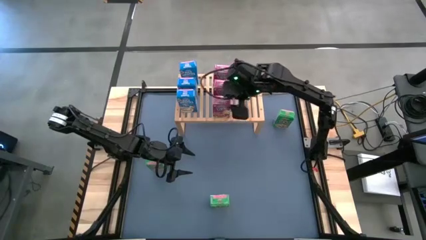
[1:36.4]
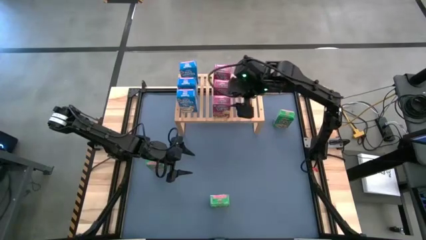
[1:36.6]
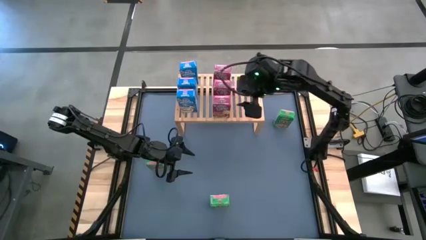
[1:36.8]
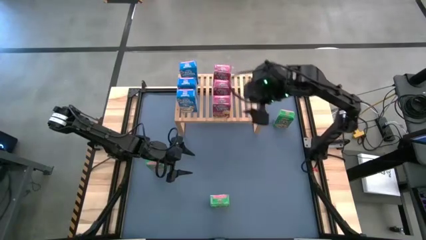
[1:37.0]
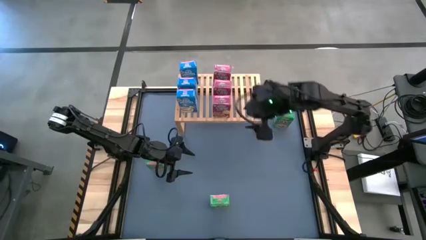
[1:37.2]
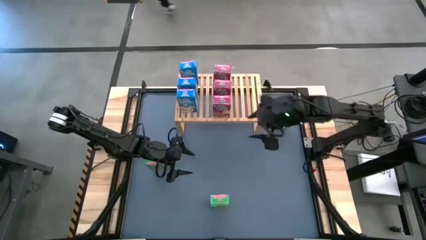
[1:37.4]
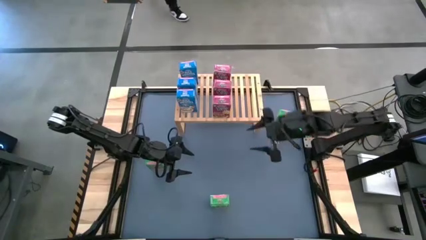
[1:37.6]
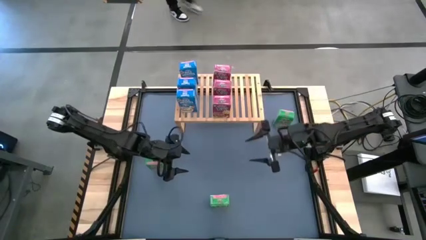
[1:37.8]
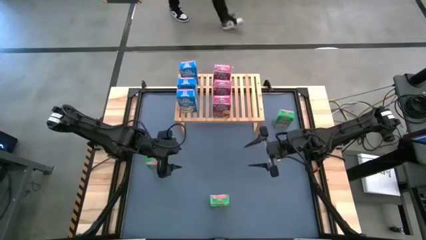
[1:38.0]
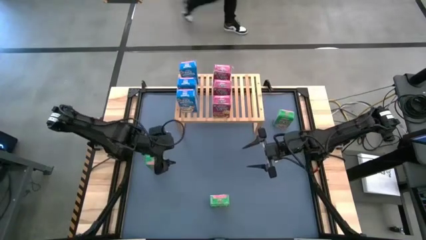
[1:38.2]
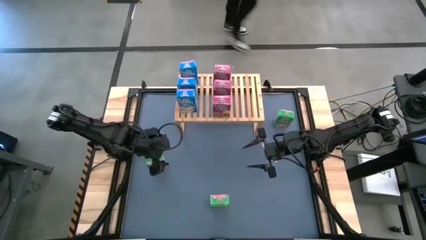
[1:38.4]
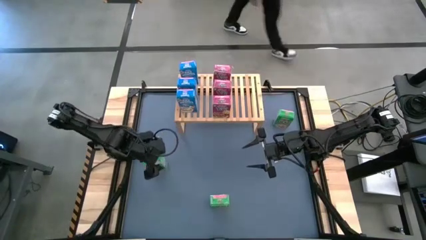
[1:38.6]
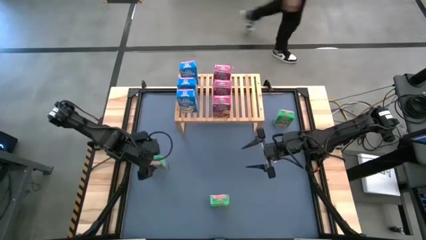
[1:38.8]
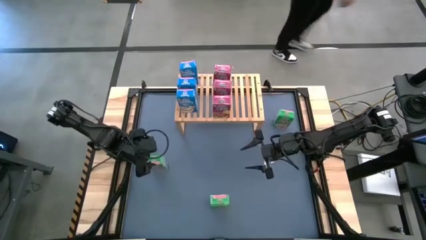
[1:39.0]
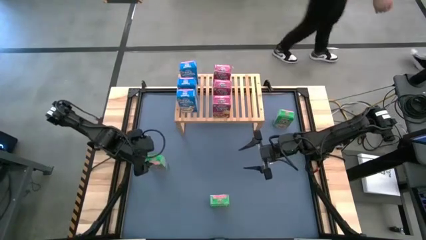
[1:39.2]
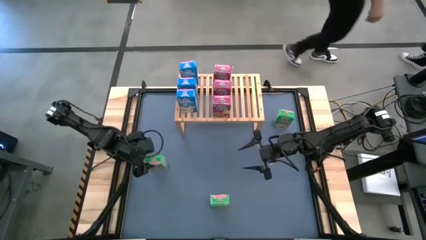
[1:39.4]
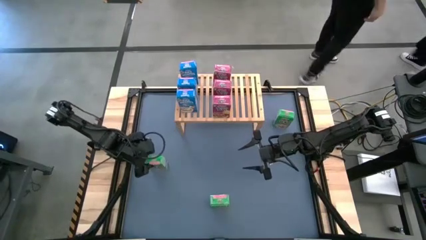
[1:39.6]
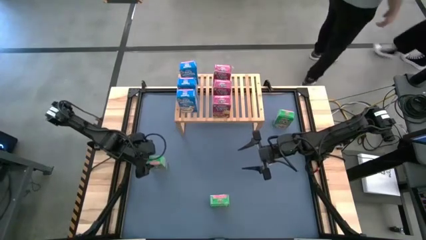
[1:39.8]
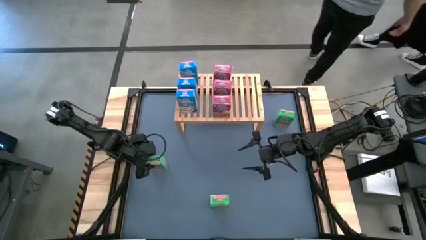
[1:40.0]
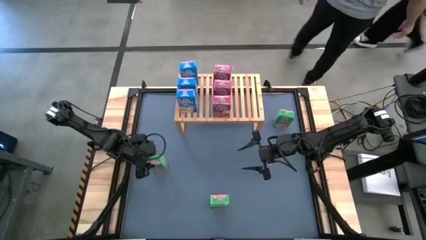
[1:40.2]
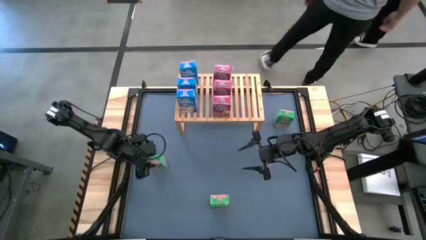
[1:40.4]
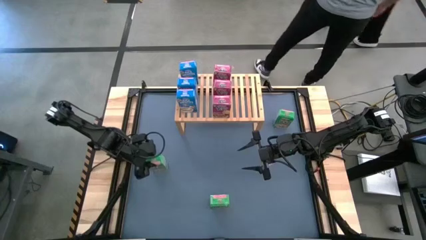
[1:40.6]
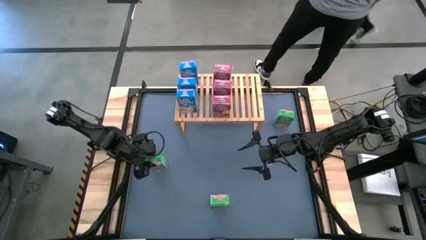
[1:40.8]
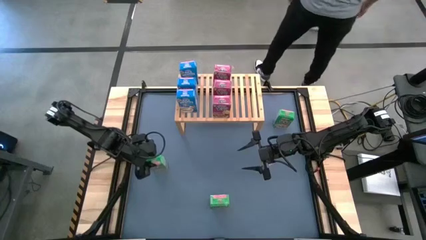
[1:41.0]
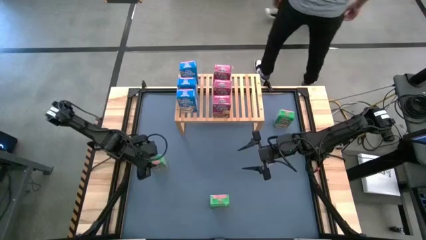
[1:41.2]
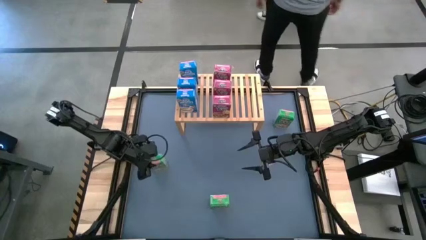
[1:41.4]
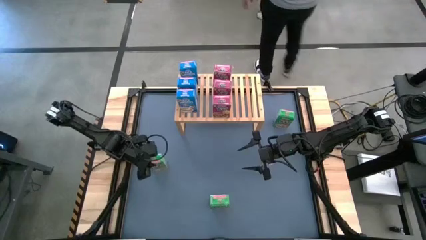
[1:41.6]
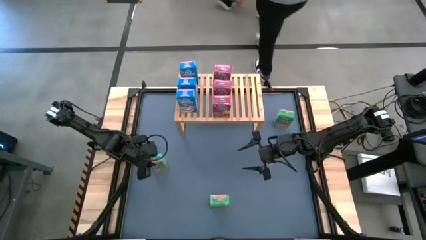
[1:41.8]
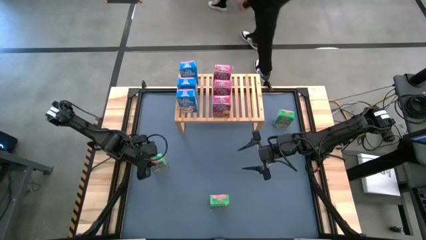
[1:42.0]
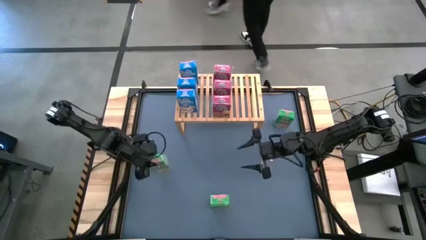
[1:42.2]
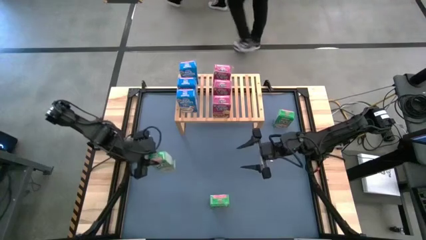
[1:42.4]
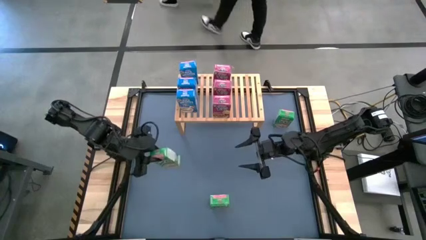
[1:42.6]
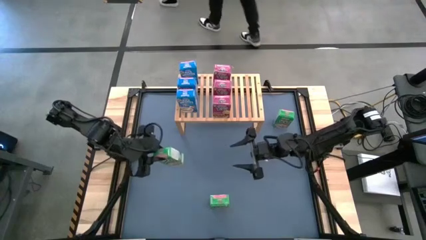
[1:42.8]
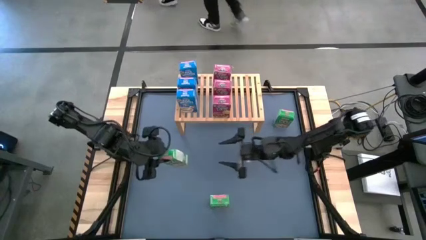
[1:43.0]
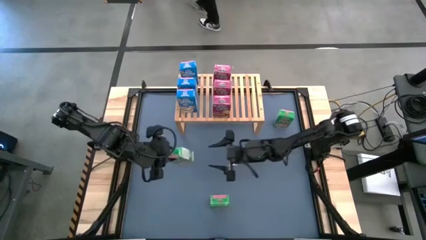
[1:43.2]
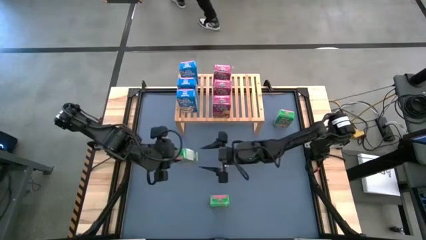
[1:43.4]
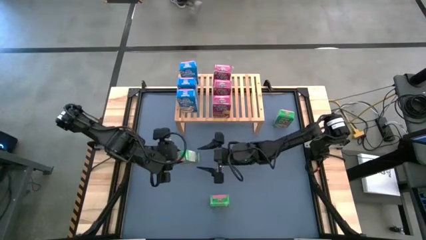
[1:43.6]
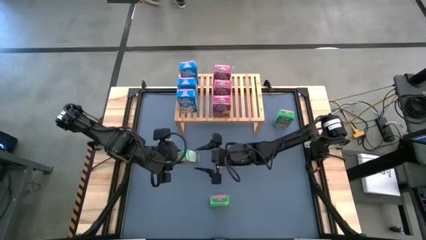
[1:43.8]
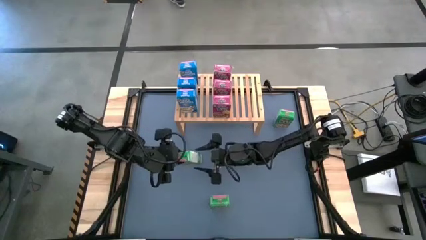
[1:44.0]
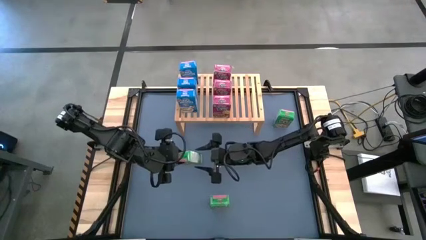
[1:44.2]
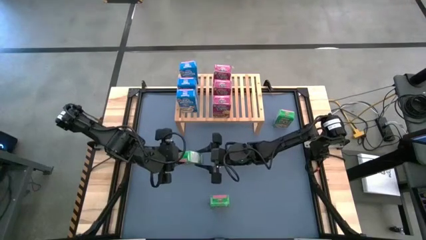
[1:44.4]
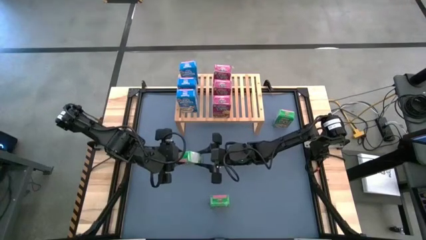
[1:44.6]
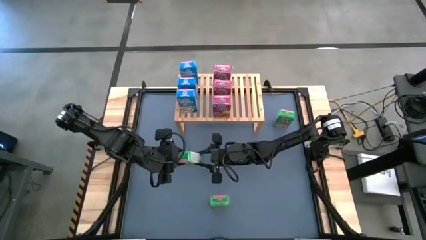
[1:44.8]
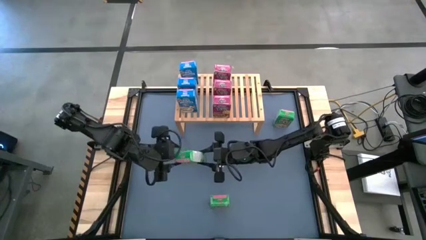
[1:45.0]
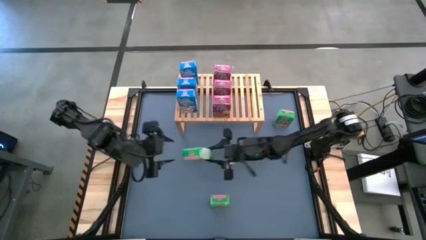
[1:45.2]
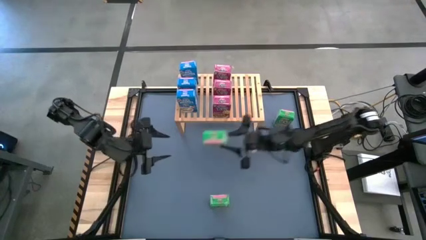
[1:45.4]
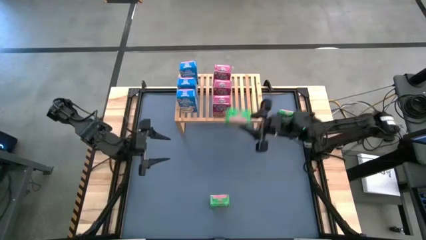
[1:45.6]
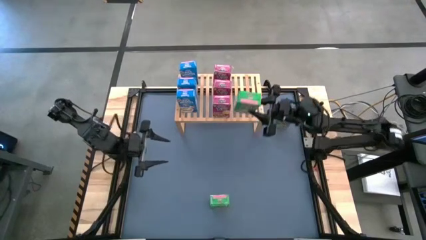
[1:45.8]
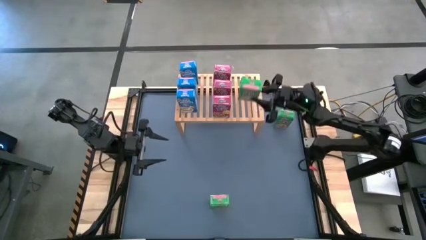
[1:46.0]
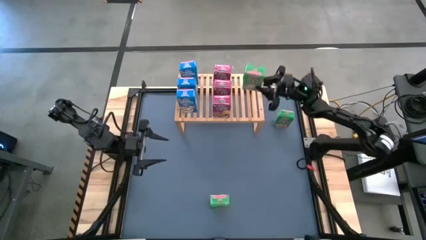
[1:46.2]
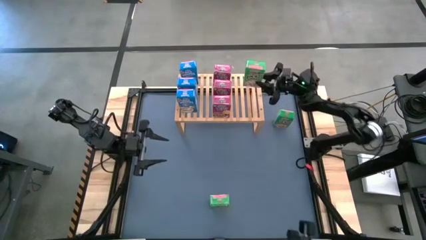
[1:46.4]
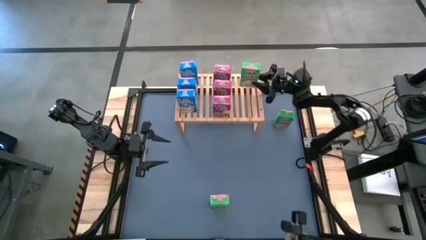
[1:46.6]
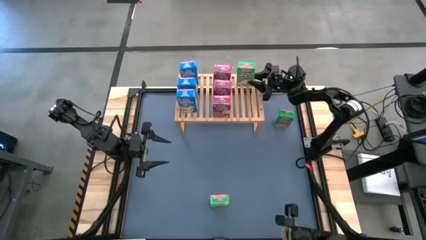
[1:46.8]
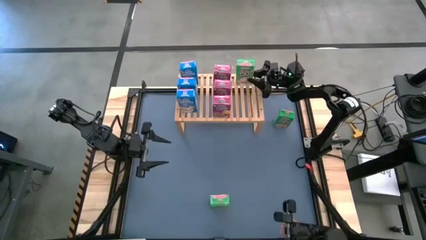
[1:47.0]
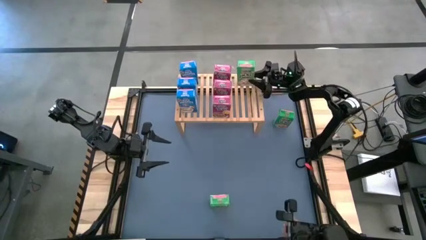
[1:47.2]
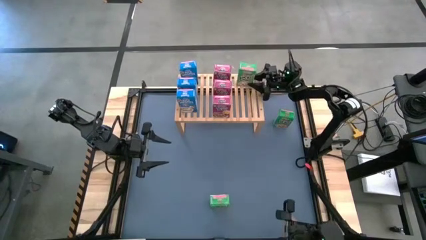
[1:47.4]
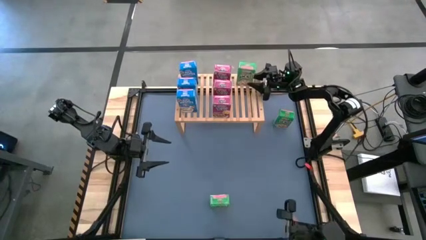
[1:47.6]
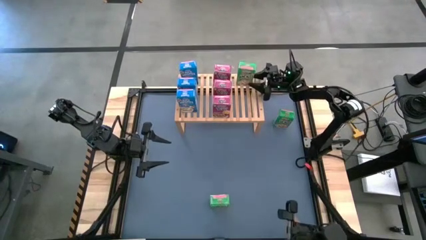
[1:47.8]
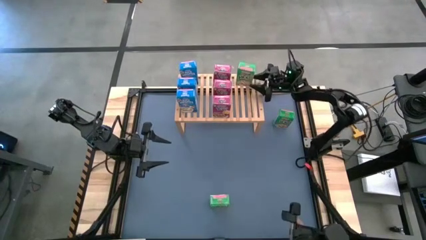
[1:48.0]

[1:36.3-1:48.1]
Task: Stack cereal on shelf
Put the middle left green cereal box on the shelf

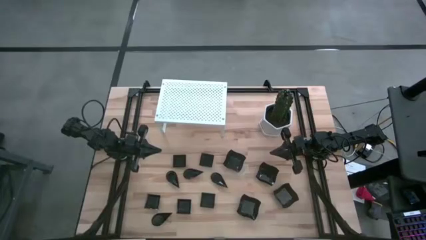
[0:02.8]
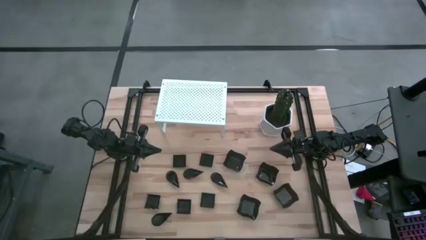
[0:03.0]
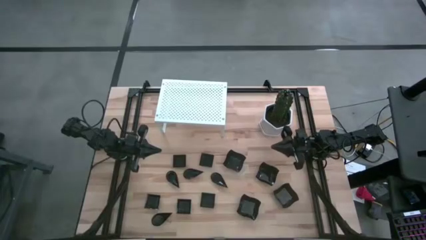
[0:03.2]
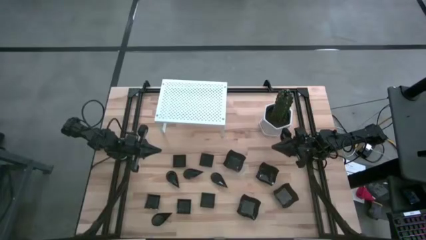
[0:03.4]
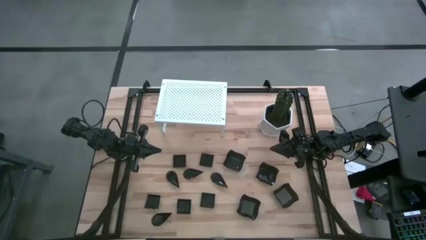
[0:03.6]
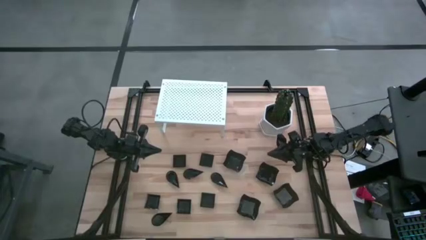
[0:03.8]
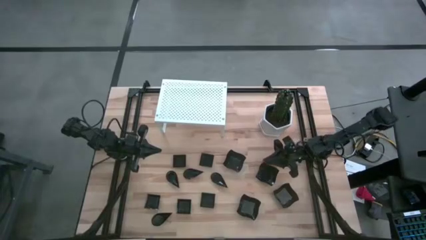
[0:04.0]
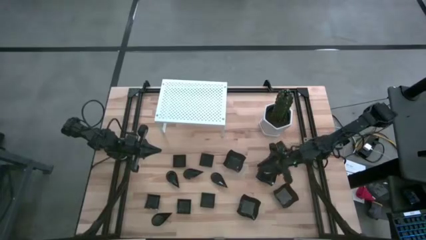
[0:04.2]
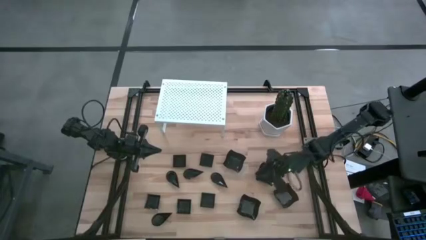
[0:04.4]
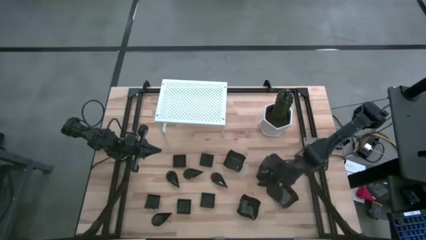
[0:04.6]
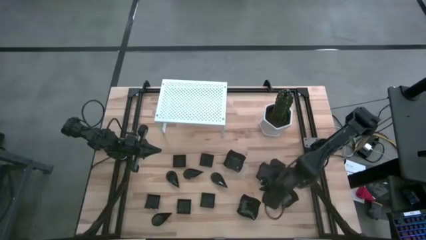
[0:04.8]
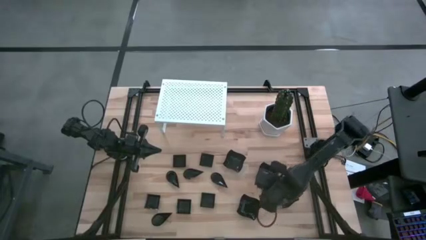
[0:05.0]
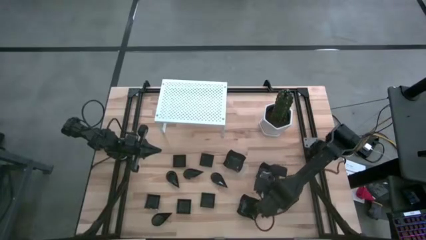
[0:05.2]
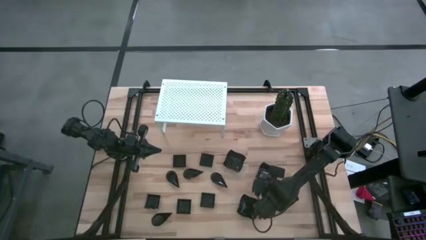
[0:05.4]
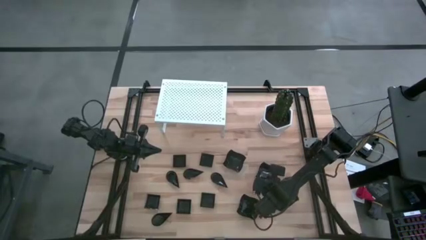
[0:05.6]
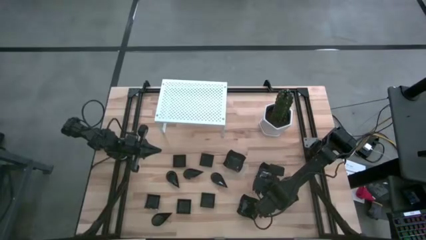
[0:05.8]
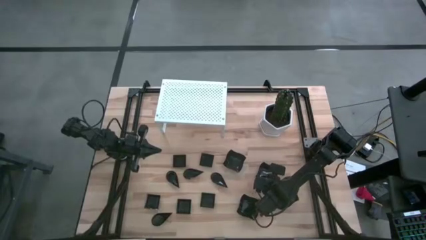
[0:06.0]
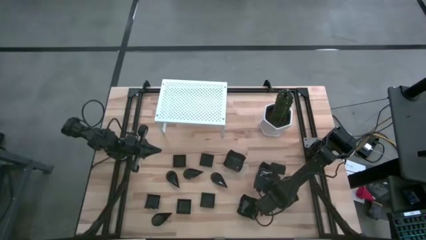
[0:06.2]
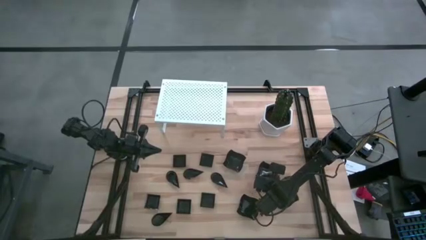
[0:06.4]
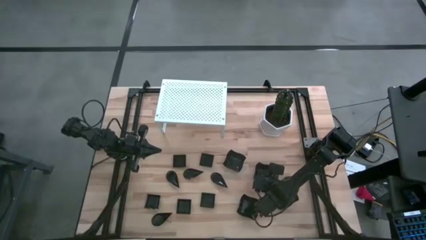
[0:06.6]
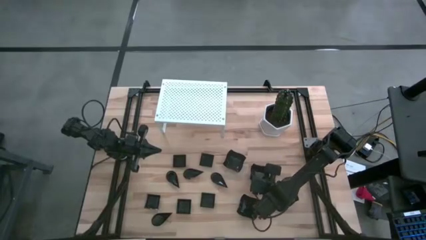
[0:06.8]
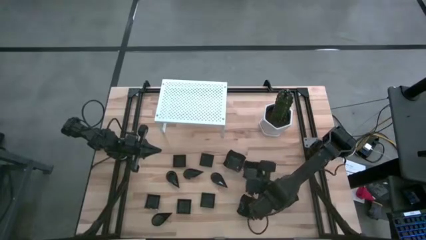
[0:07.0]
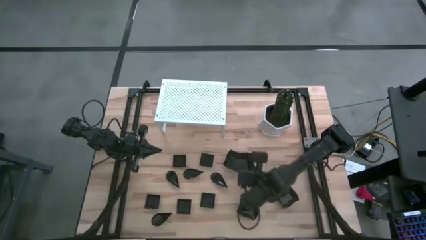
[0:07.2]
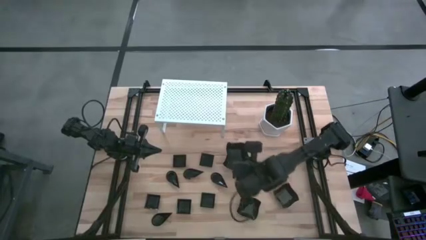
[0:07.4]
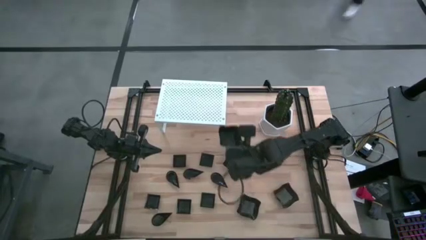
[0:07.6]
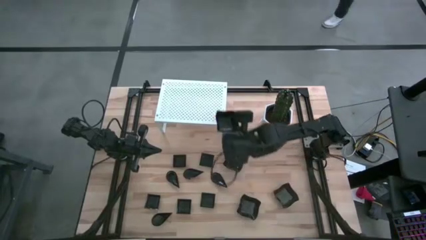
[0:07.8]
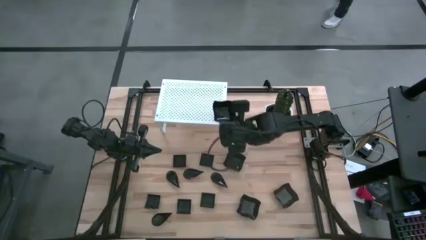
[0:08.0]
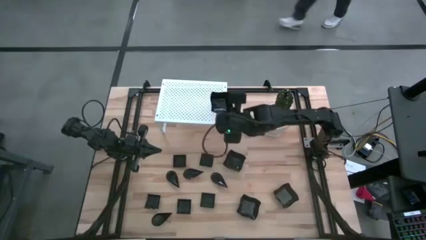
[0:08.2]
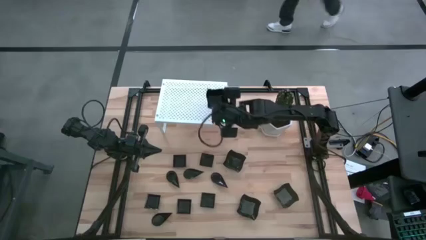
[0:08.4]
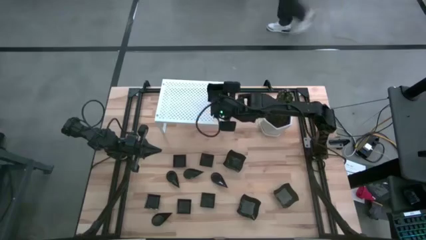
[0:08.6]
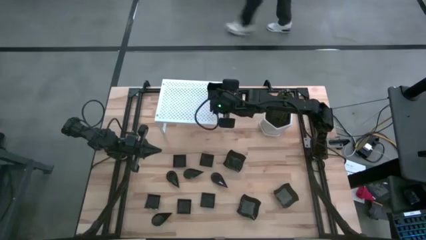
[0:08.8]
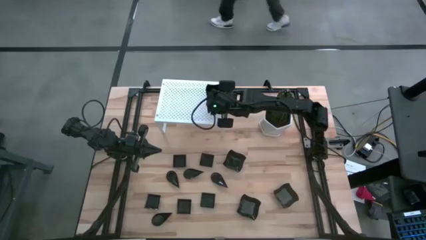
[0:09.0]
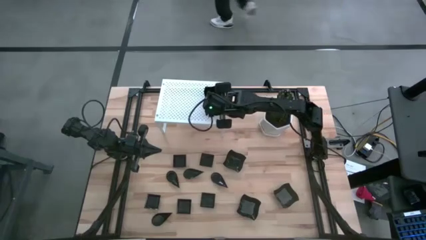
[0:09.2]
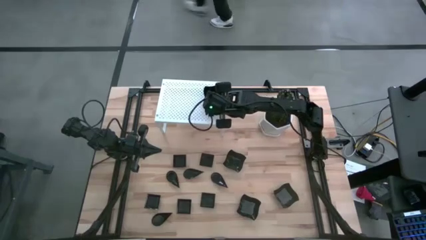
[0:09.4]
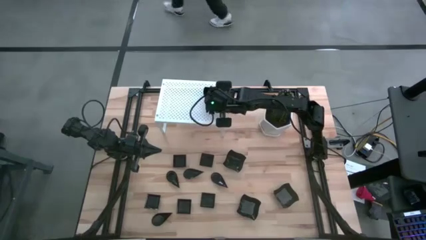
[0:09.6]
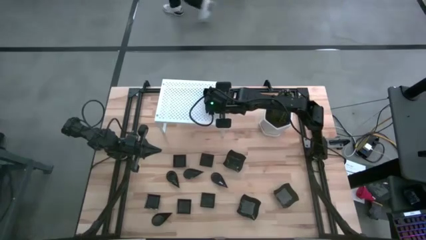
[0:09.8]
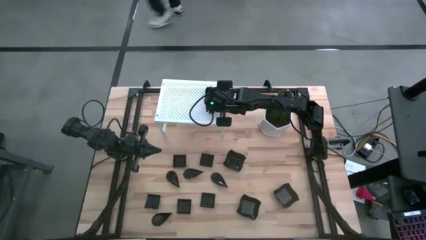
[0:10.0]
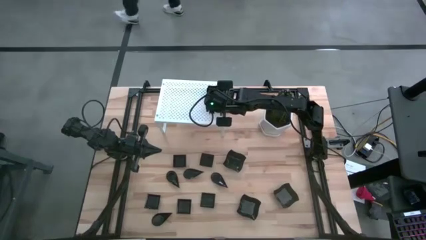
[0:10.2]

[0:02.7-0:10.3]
Task: Pick & Place Mini shaped plates
Put the distorted square plate on the shelf
